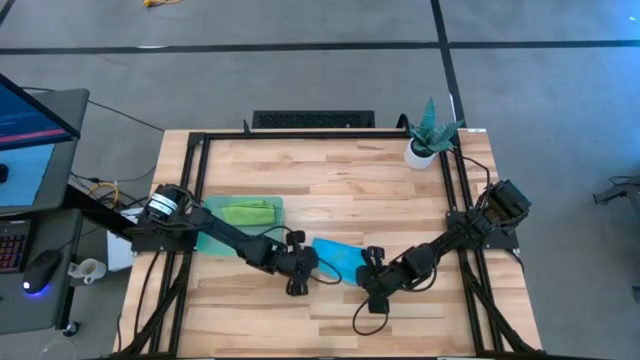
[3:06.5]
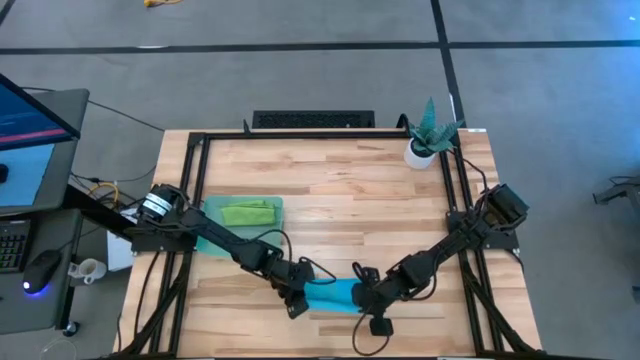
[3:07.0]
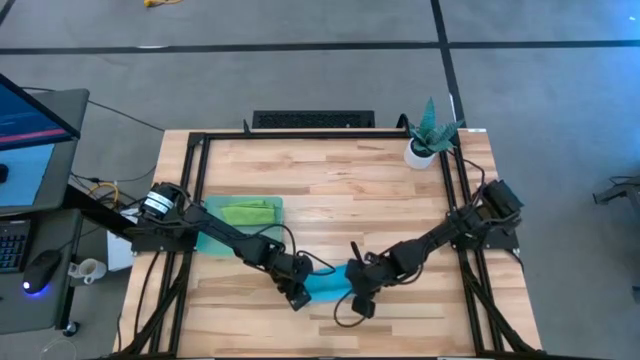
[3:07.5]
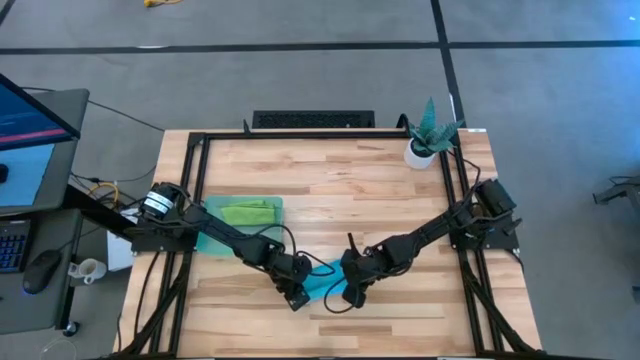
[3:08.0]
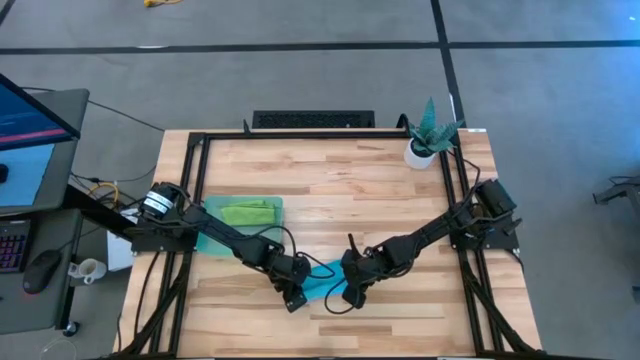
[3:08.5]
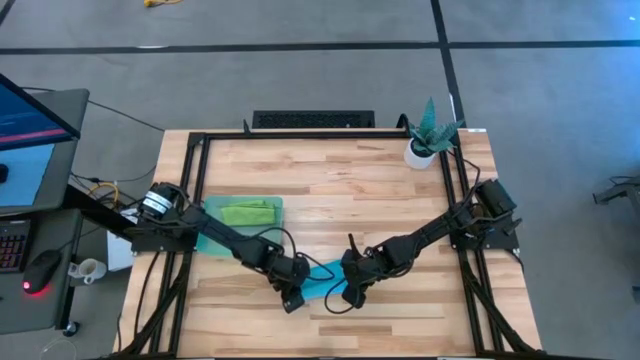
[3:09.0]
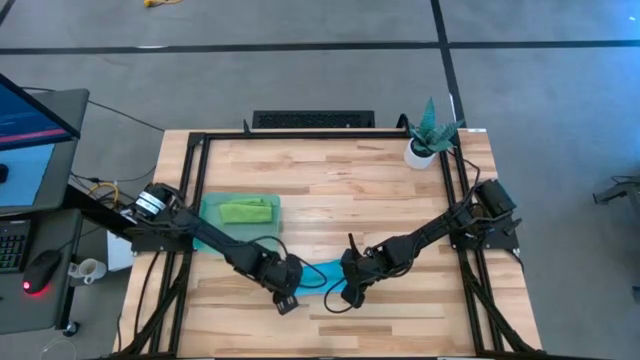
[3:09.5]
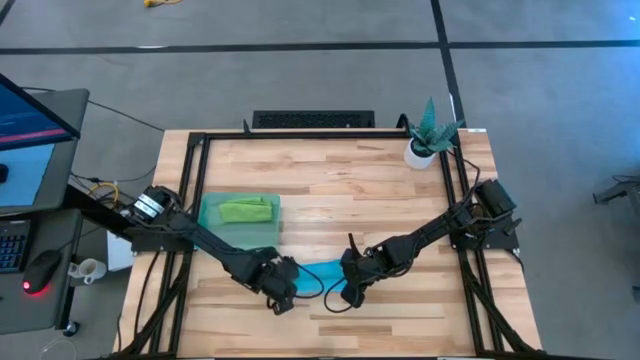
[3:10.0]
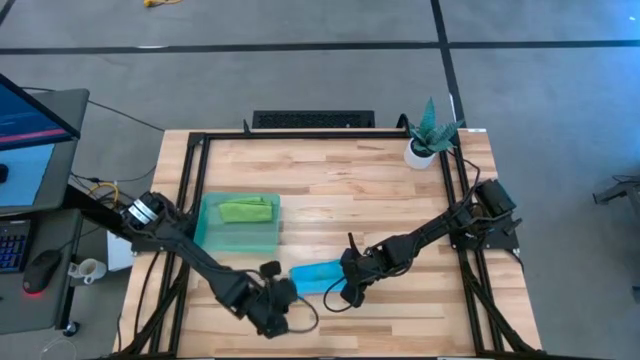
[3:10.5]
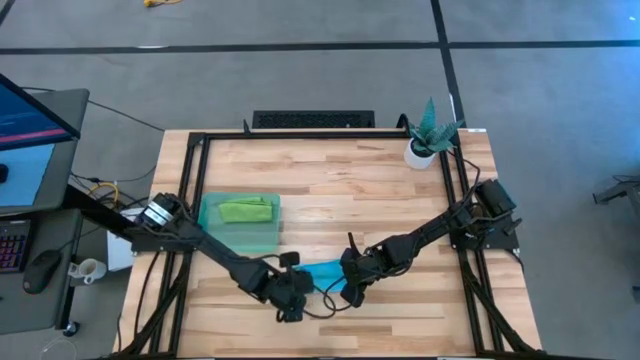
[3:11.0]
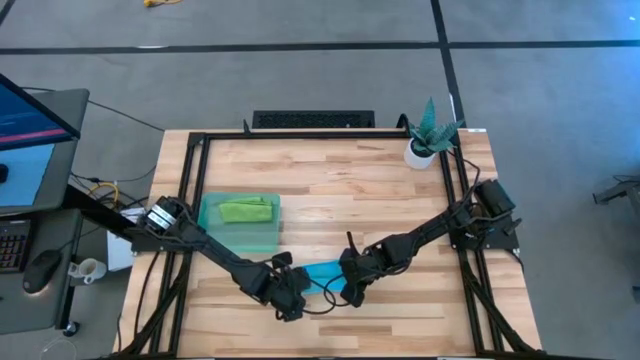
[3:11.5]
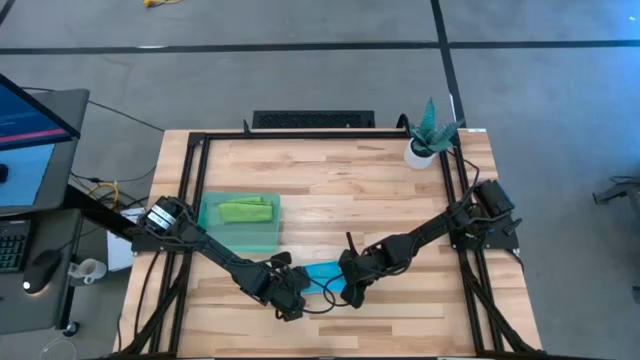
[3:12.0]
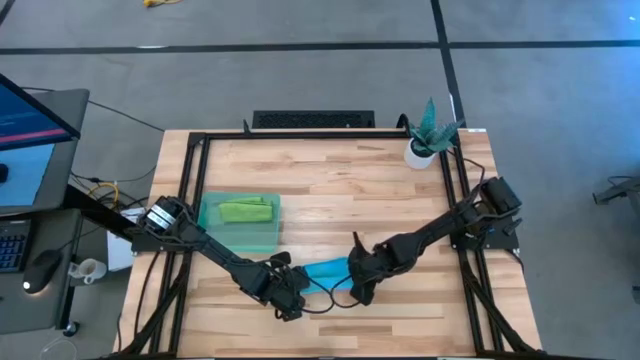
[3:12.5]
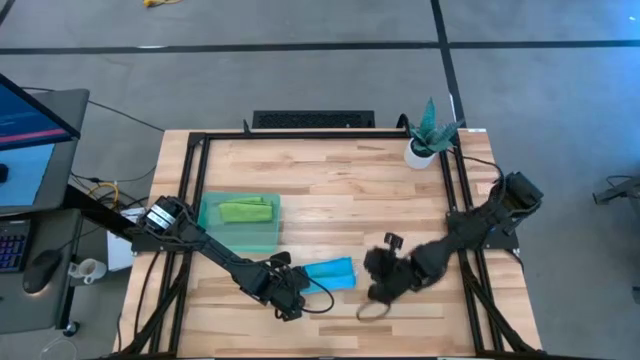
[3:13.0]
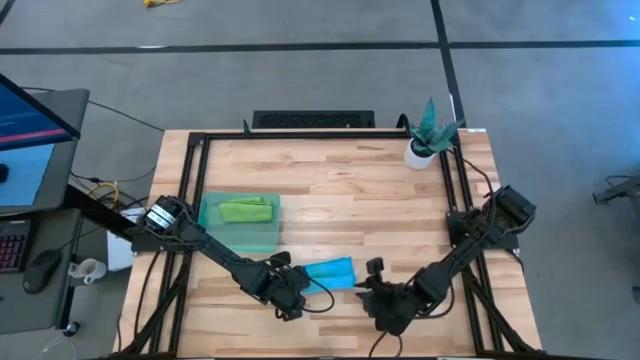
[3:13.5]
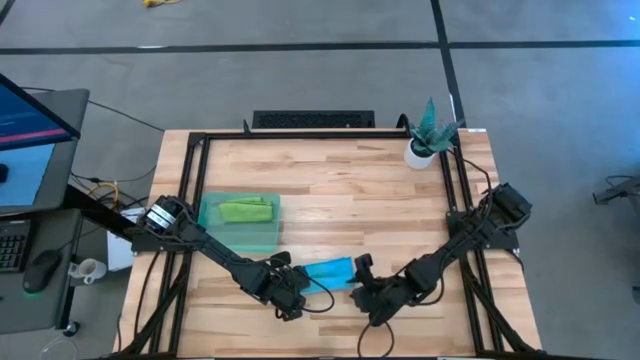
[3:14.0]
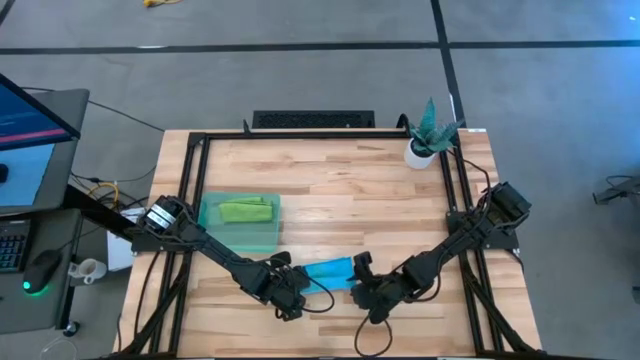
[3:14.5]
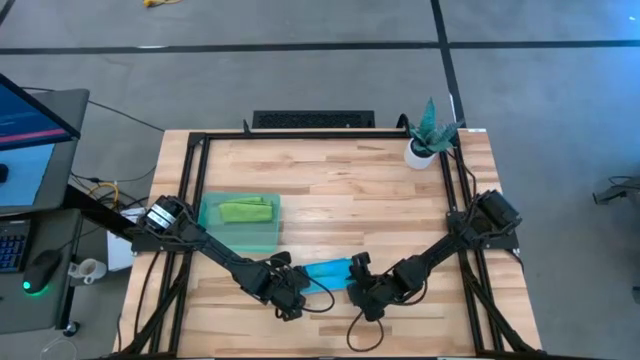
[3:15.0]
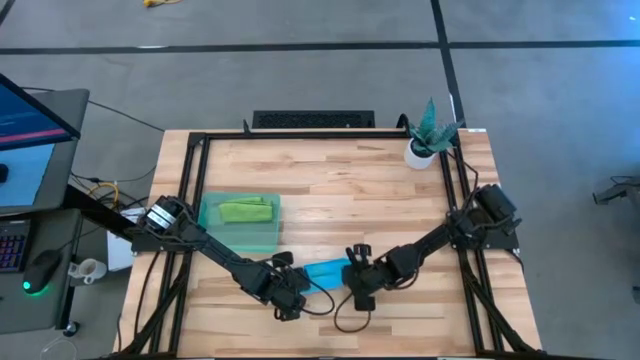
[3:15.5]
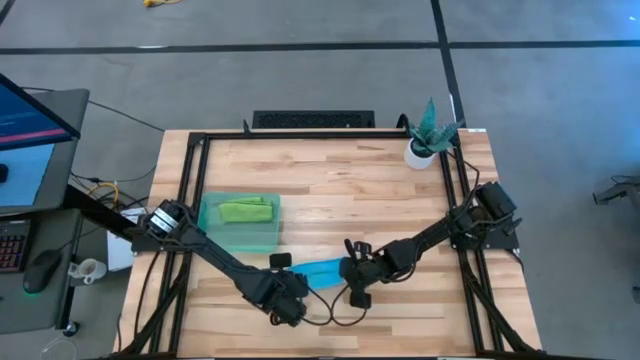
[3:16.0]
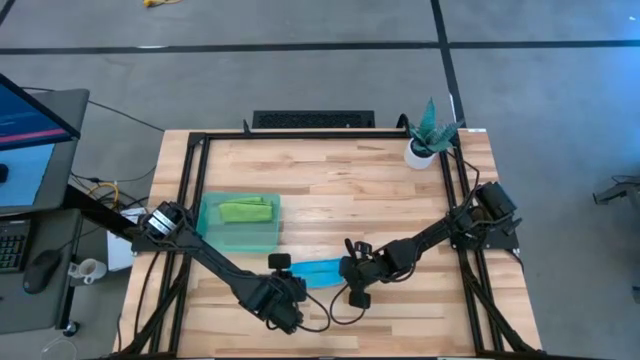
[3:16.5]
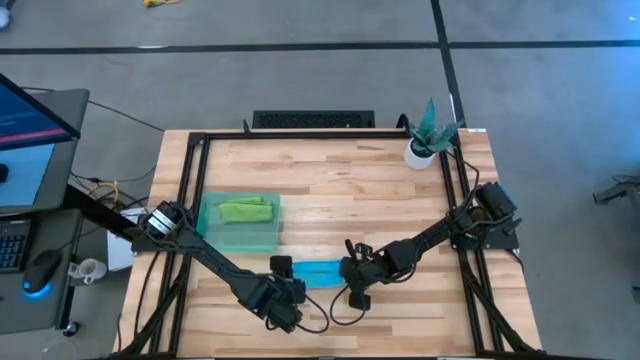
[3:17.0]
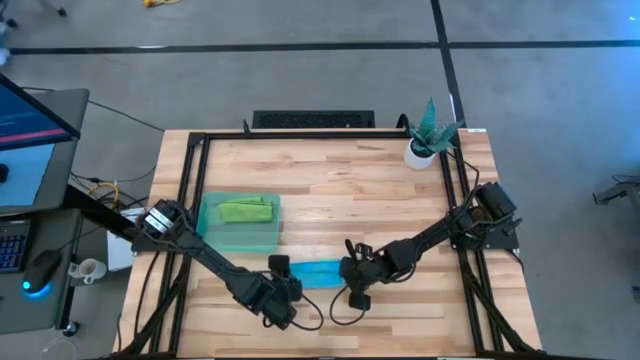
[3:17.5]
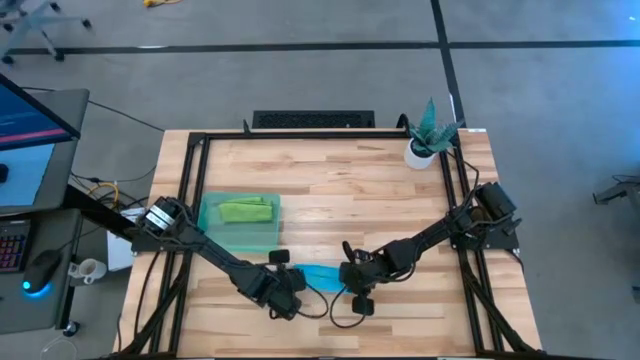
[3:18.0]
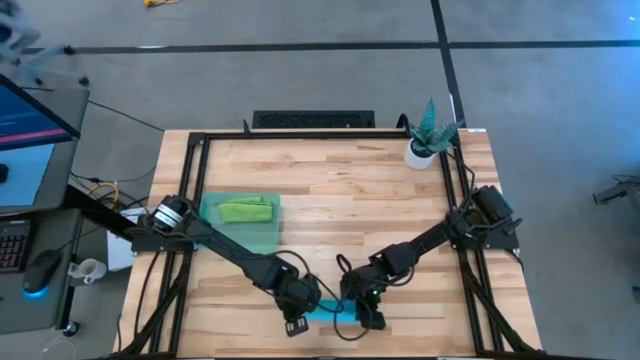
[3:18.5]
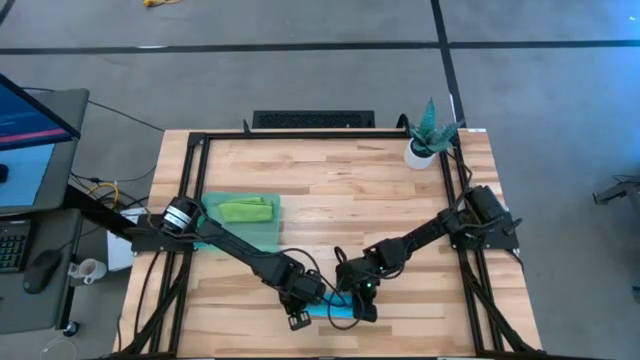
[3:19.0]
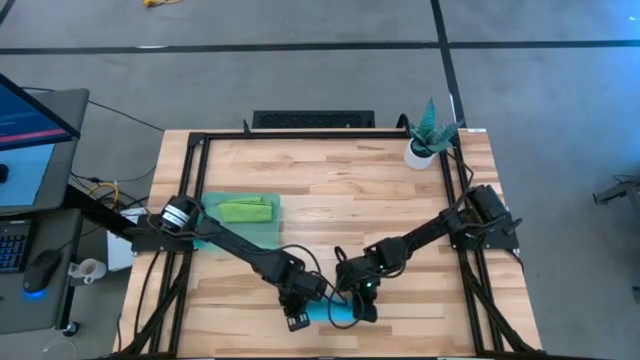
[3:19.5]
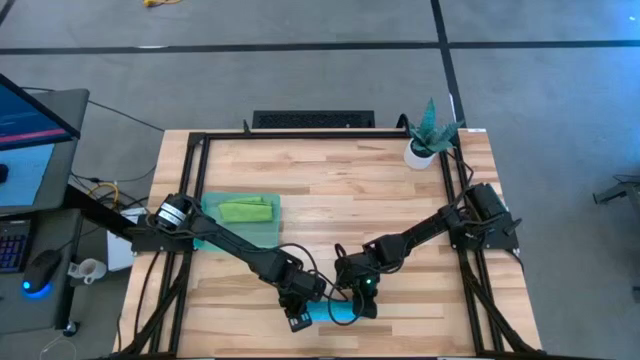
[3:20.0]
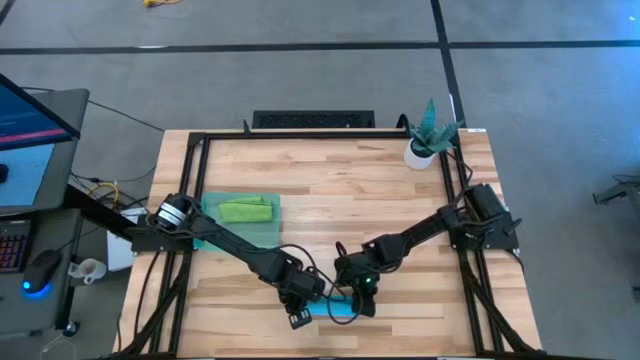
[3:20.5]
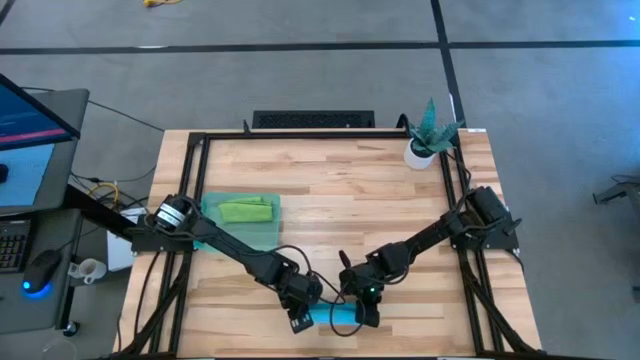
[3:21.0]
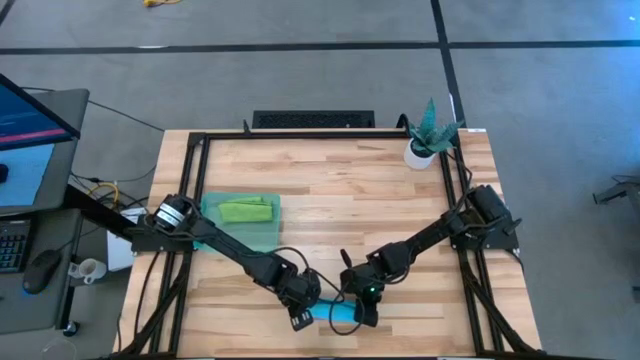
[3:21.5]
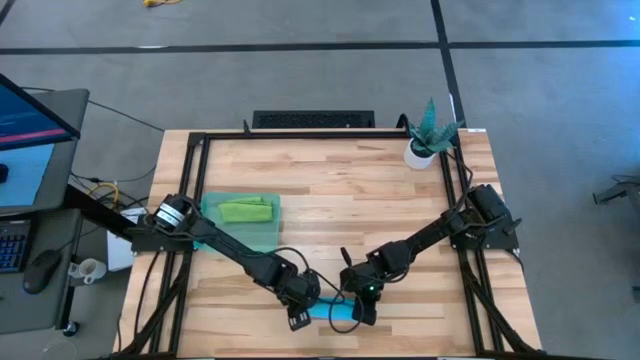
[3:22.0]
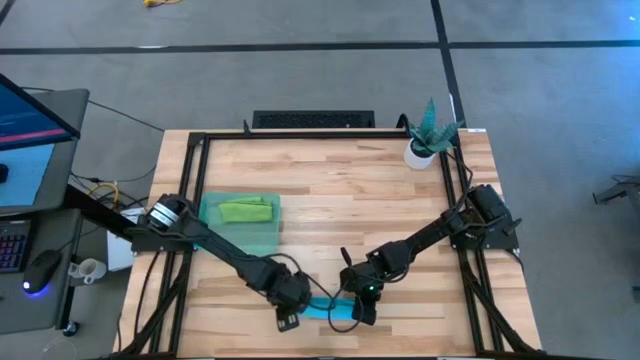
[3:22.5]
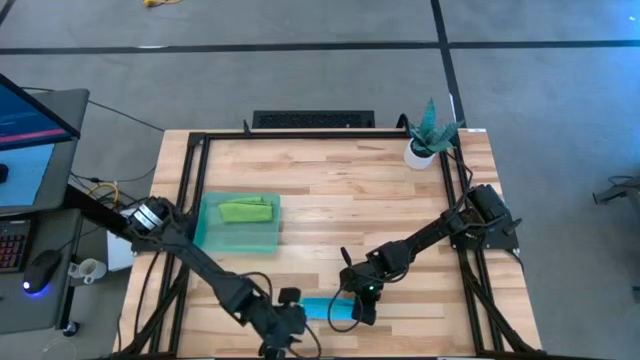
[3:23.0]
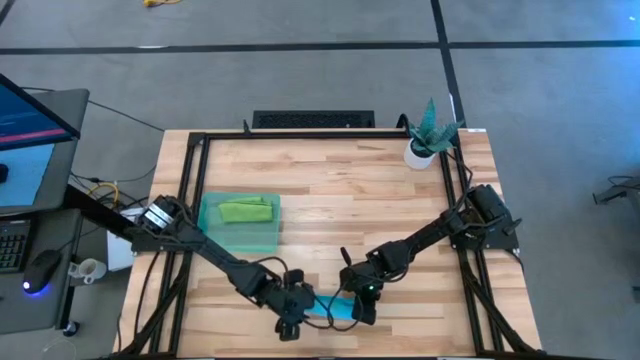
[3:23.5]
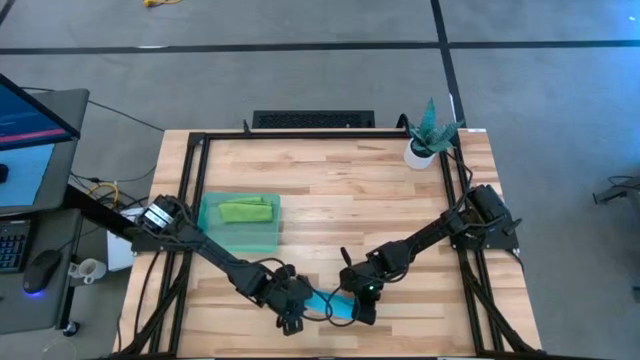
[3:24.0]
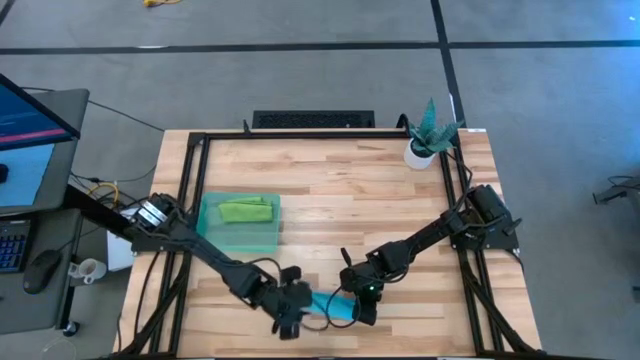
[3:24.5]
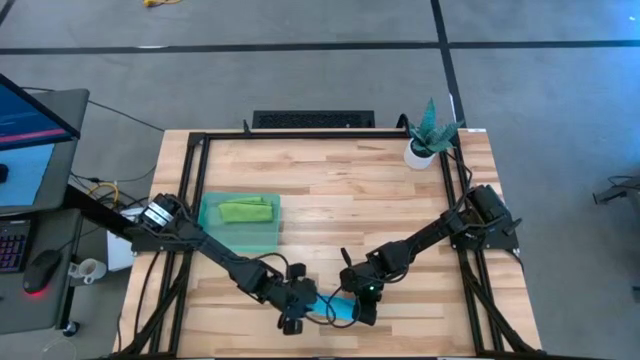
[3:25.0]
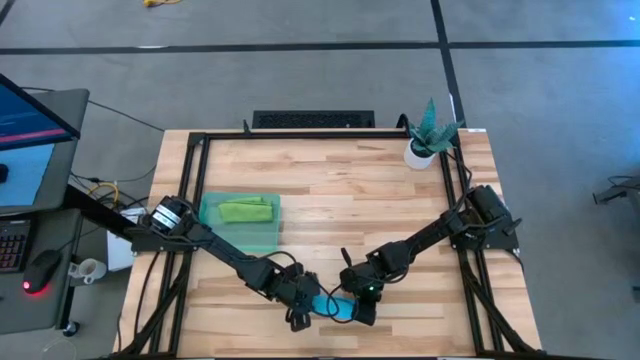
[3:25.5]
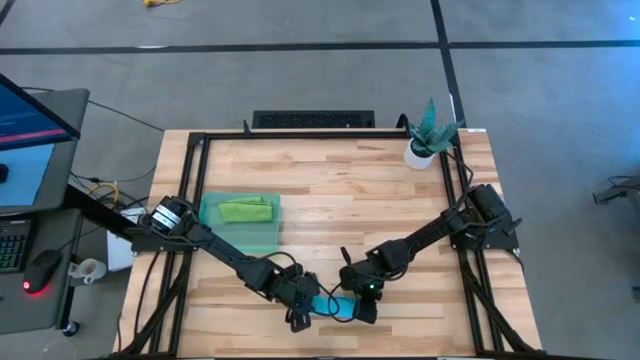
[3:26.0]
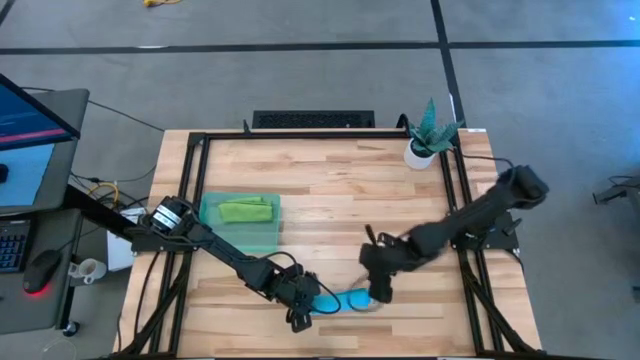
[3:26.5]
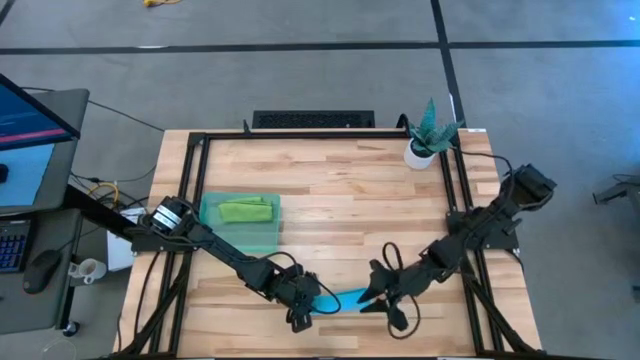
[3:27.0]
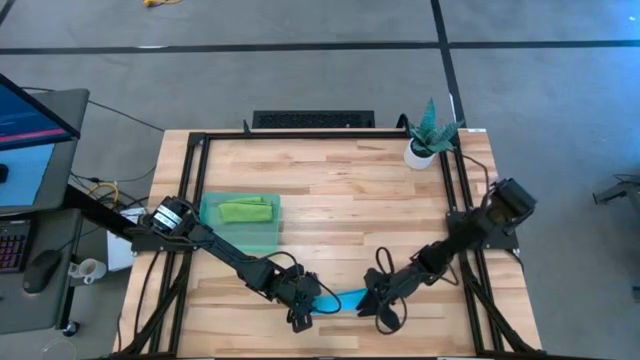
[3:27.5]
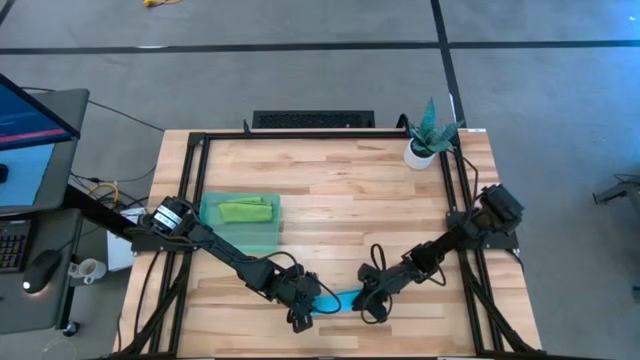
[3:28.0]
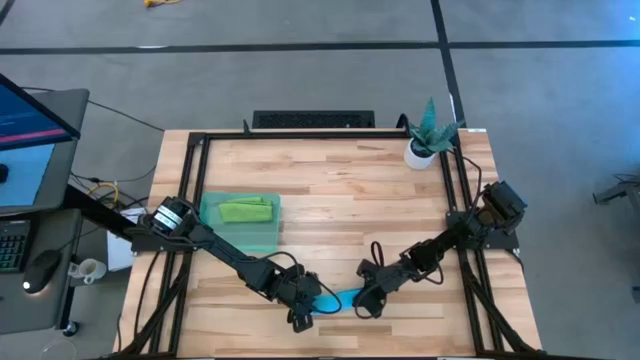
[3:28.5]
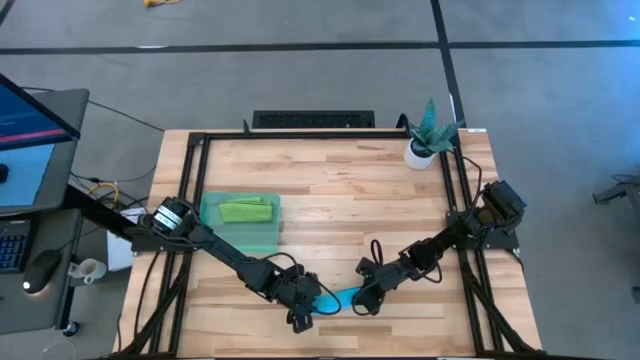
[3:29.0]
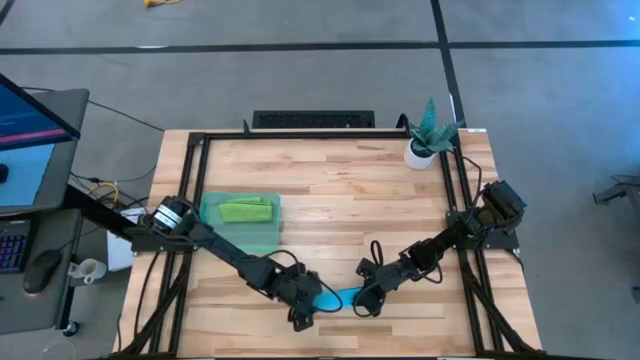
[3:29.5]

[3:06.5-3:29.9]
Task: Roll microfiber towels into tight, uniform cylinder then place into a basket
Roll the blue towel
